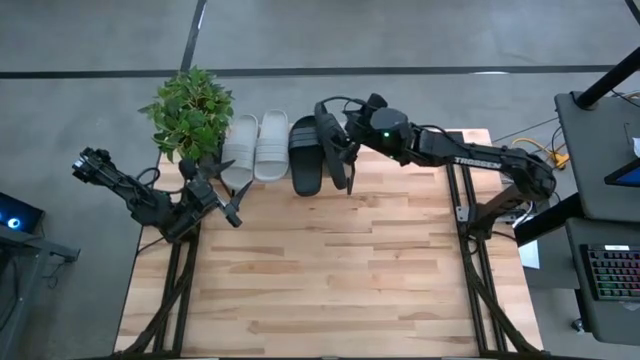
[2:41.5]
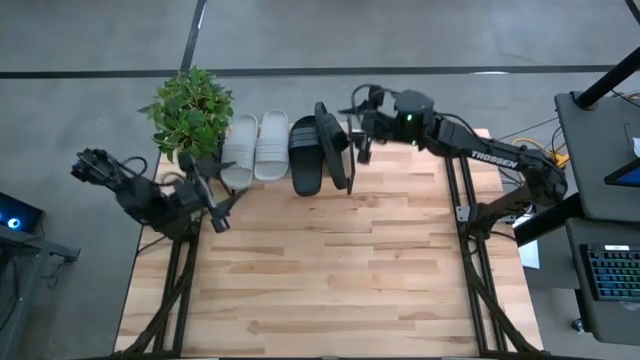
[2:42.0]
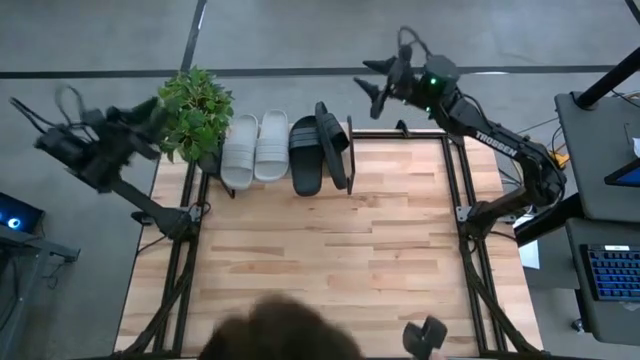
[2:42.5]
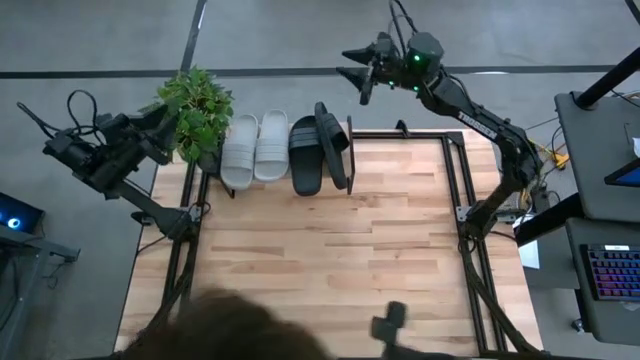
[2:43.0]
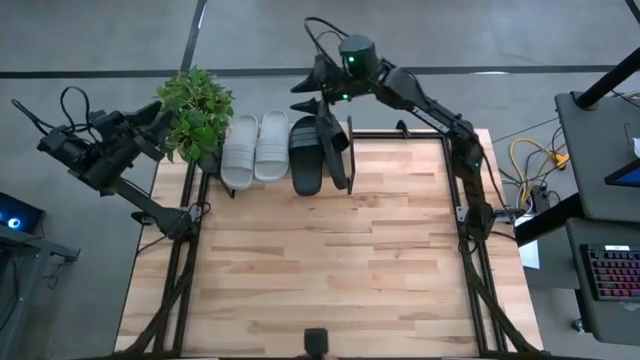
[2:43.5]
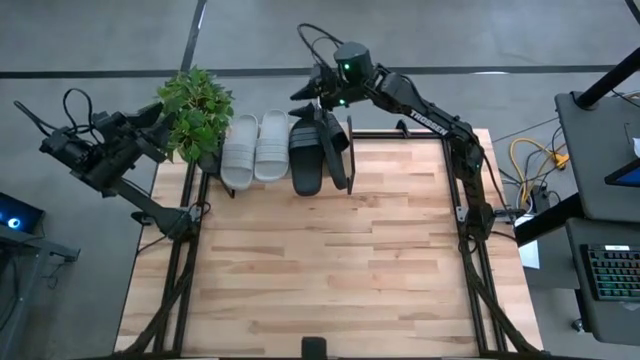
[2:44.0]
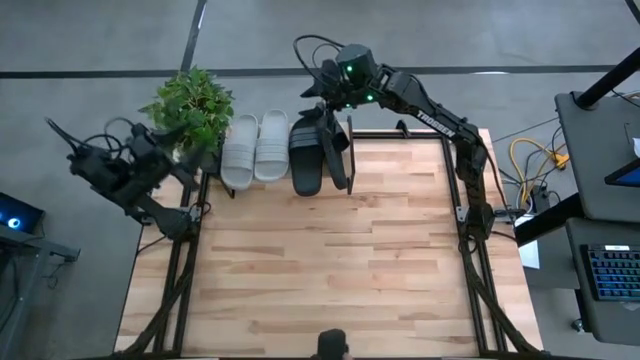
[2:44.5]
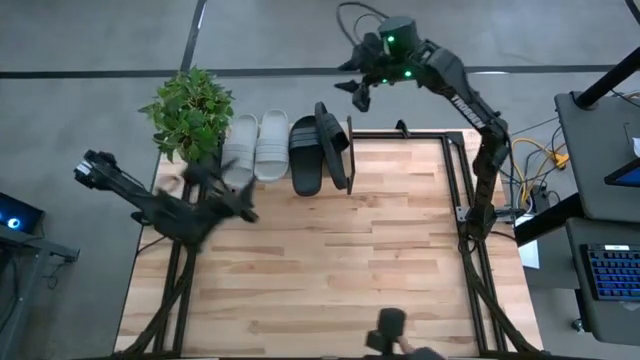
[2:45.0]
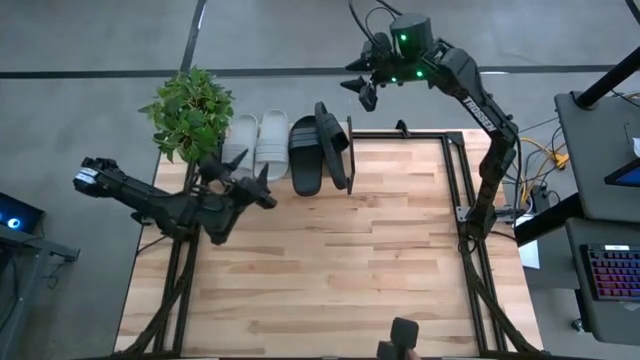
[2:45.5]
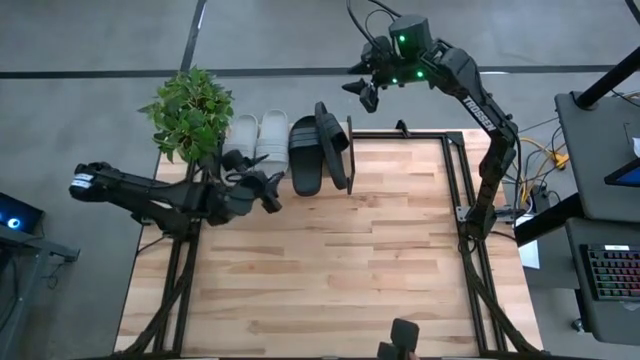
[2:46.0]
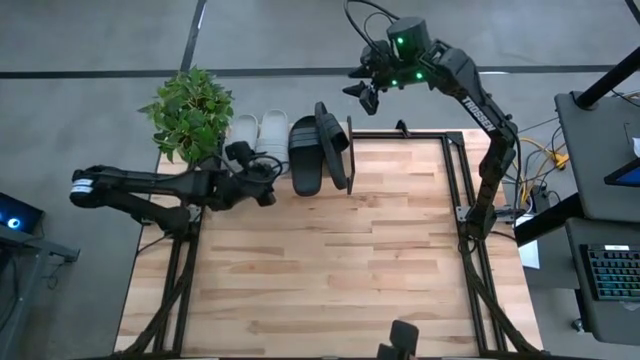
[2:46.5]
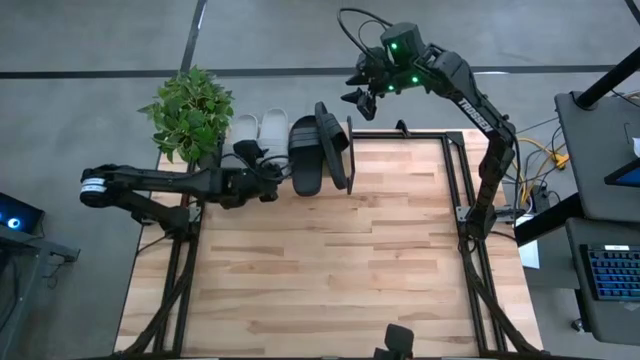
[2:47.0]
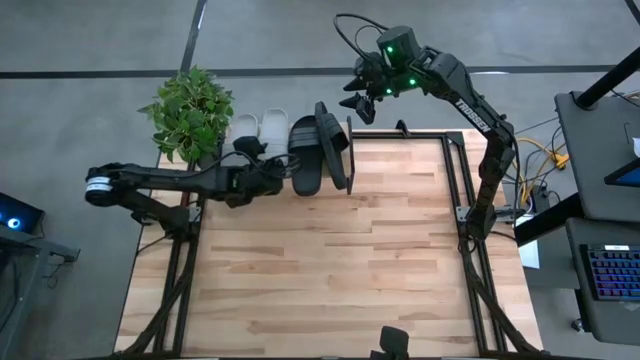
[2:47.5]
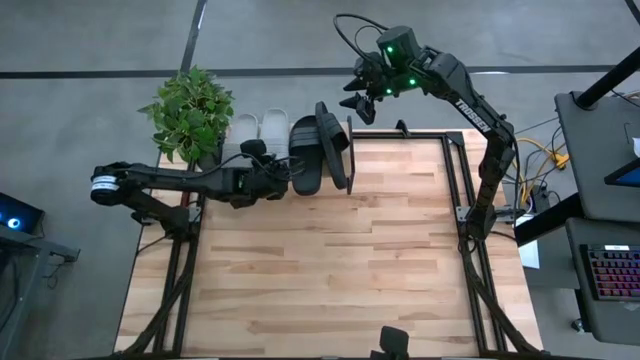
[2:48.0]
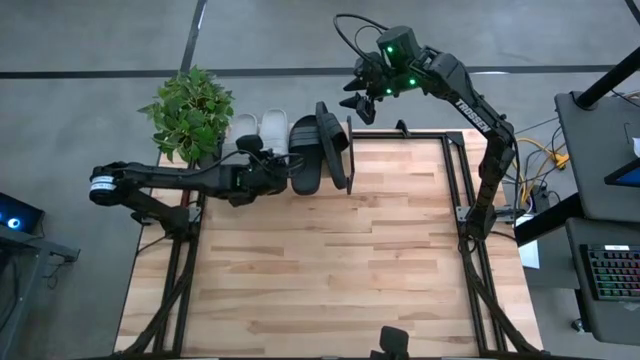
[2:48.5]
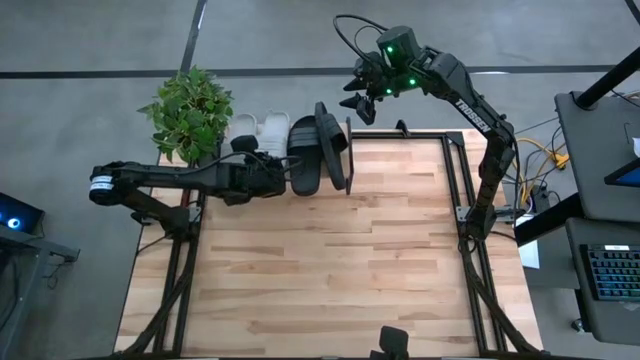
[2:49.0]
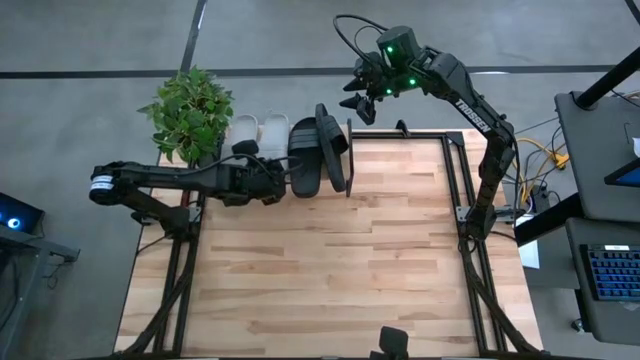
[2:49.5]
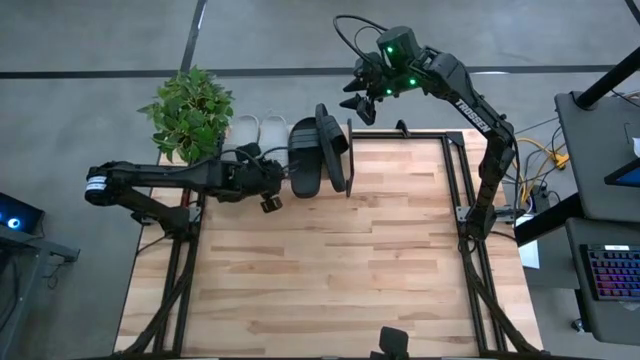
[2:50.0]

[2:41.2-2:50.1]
Task: Pick and place slides into the shelf
Adjust the right grey slipper on the shelf

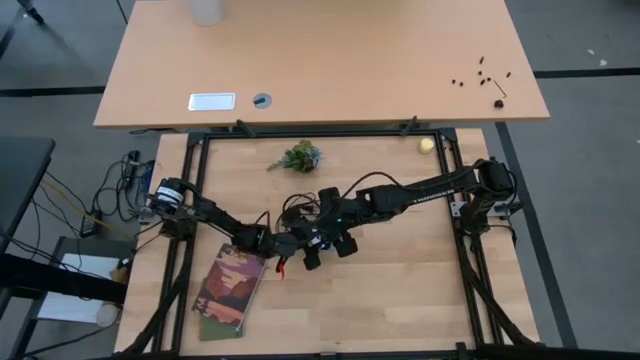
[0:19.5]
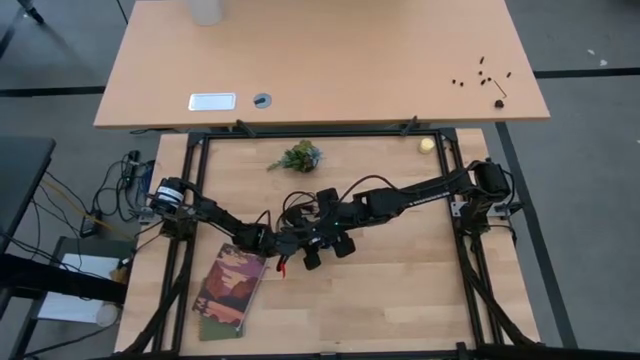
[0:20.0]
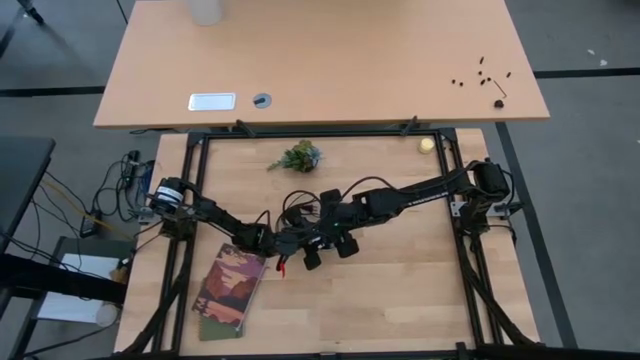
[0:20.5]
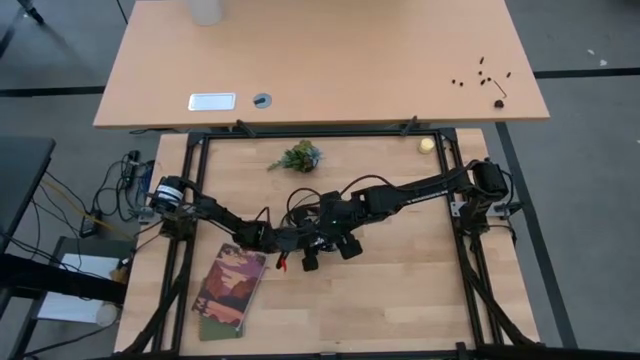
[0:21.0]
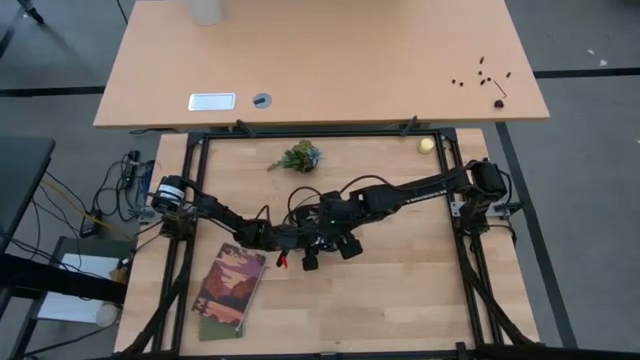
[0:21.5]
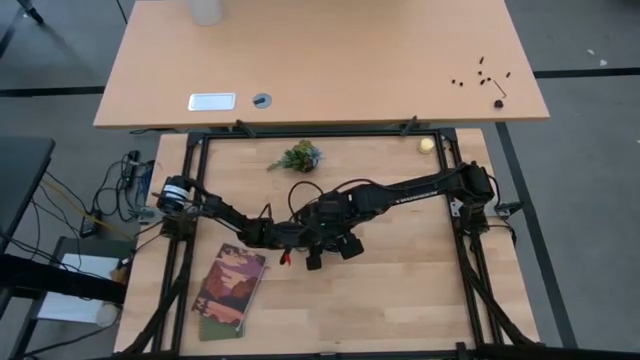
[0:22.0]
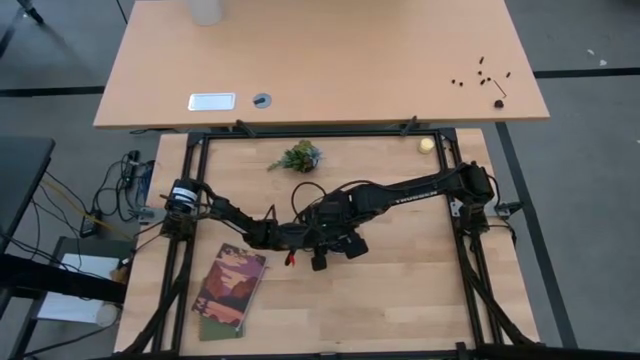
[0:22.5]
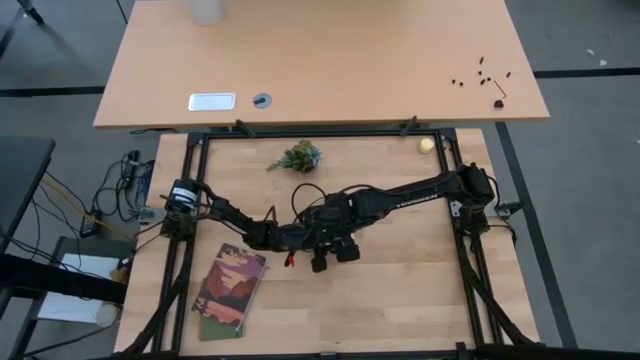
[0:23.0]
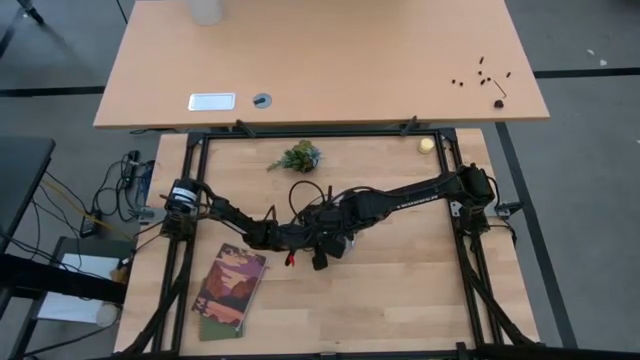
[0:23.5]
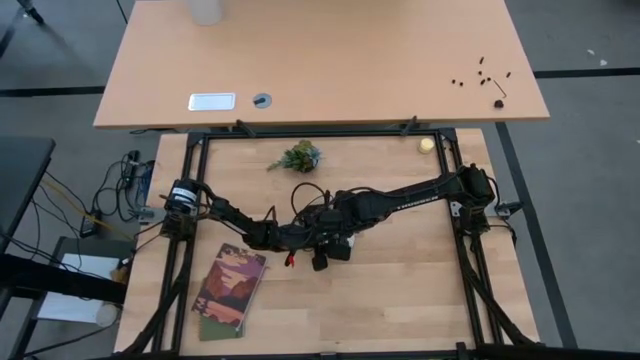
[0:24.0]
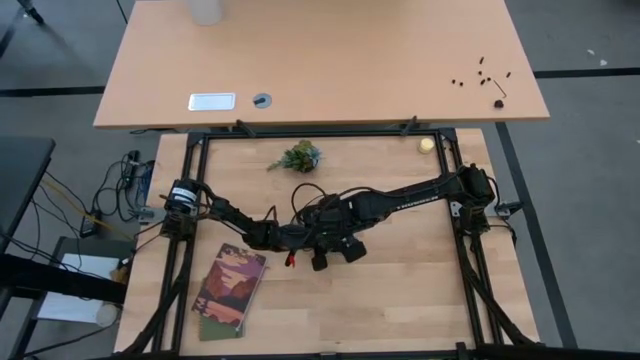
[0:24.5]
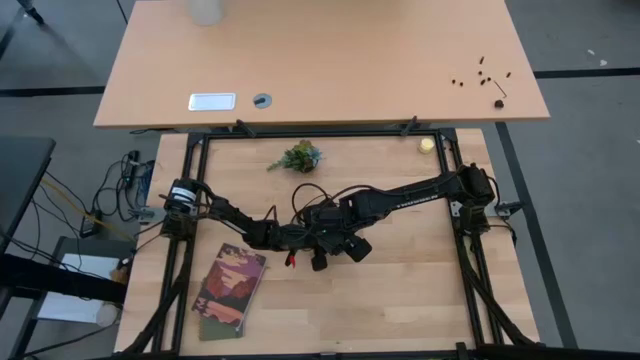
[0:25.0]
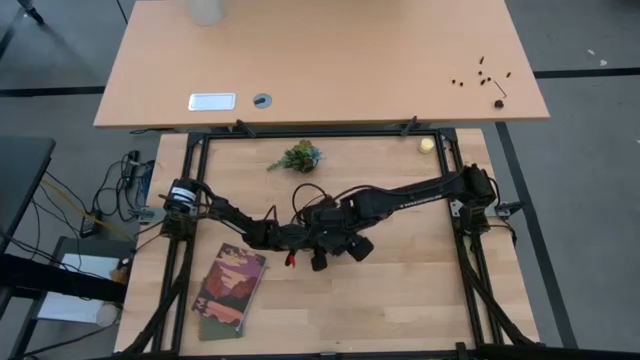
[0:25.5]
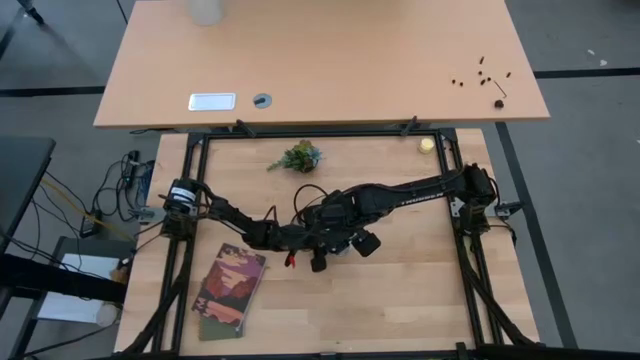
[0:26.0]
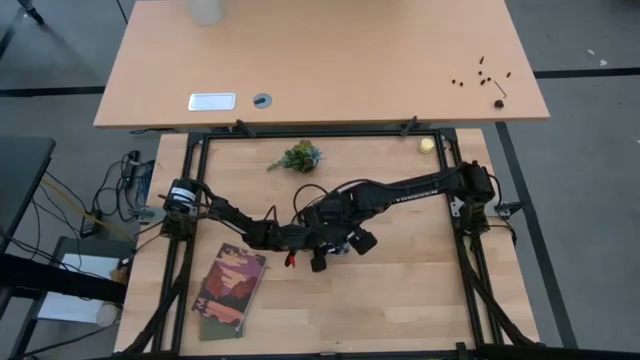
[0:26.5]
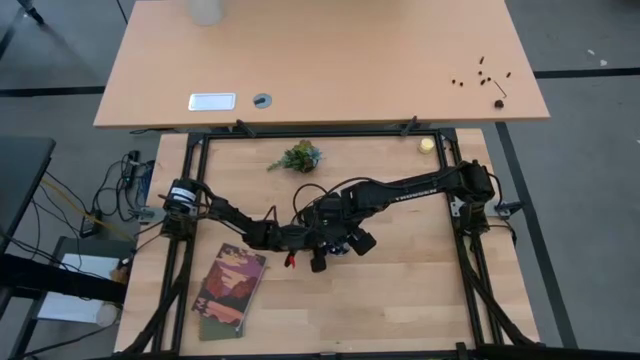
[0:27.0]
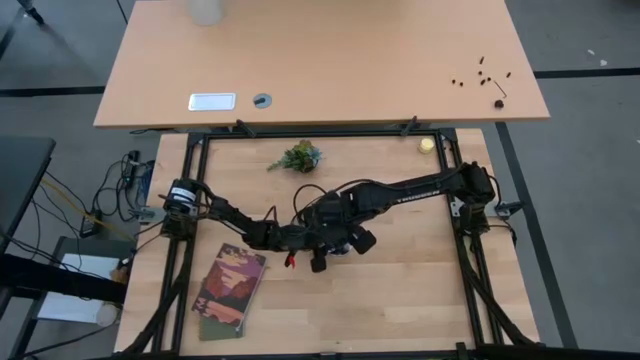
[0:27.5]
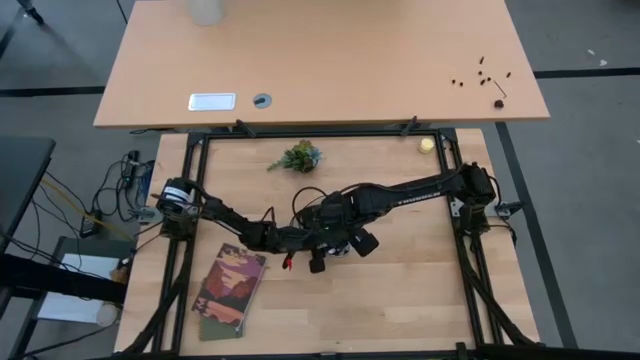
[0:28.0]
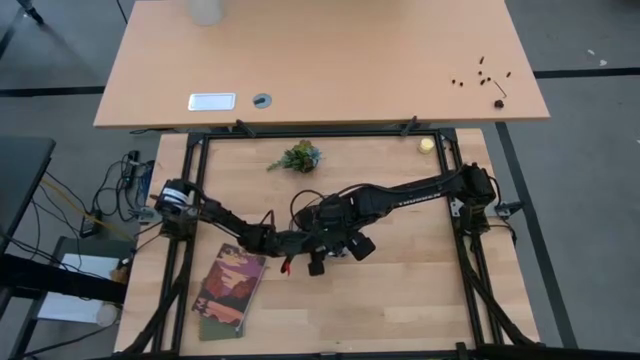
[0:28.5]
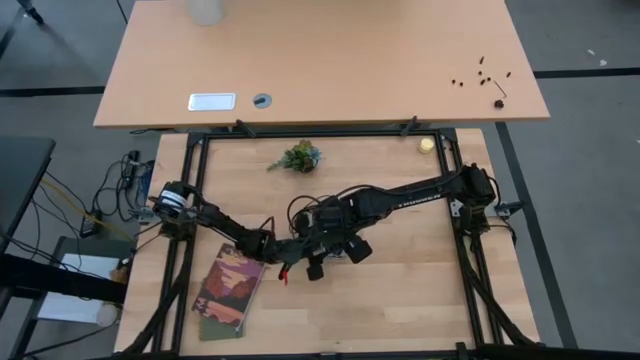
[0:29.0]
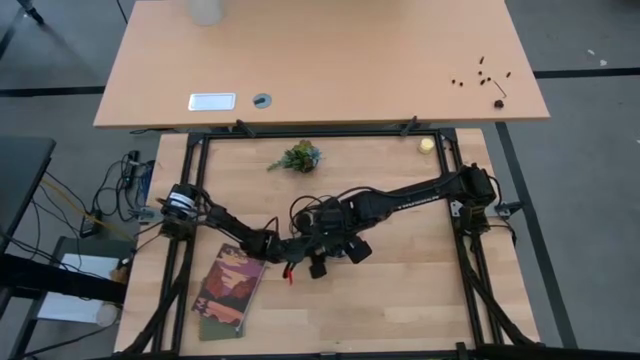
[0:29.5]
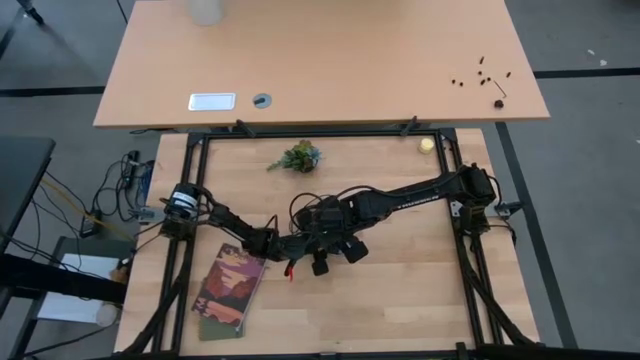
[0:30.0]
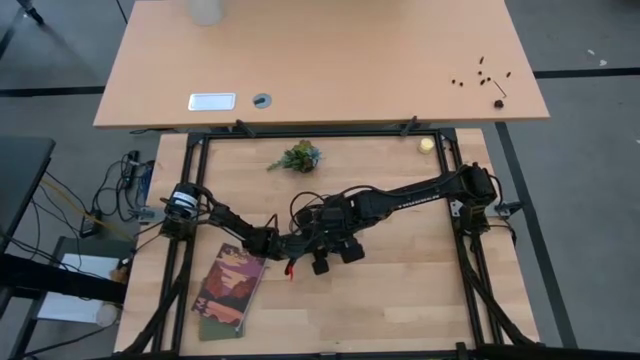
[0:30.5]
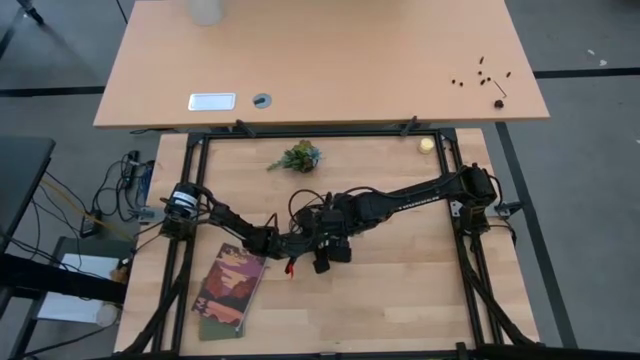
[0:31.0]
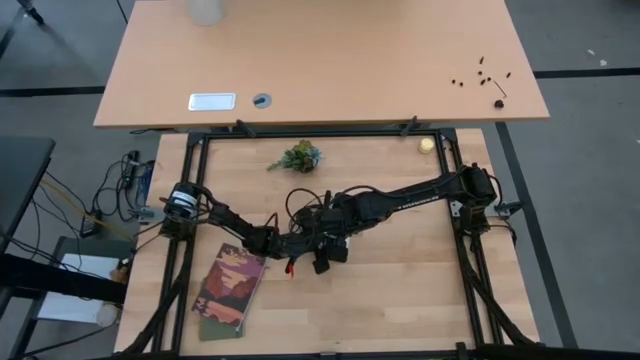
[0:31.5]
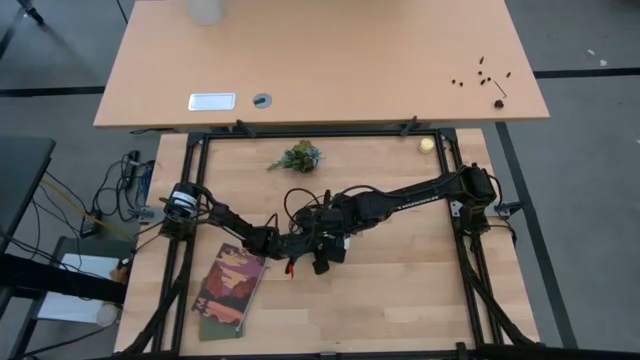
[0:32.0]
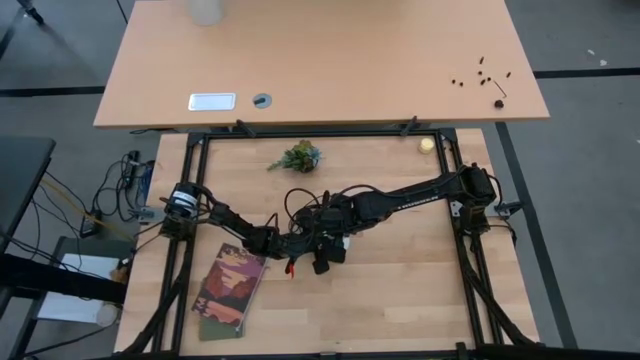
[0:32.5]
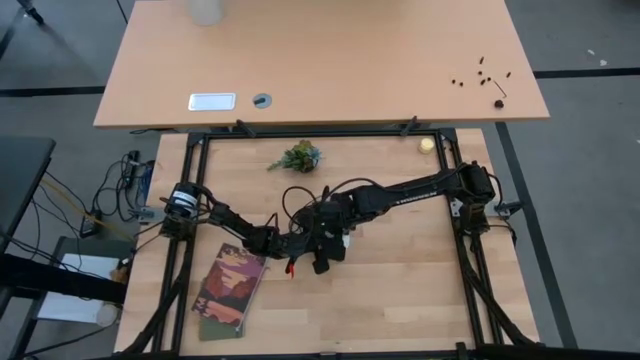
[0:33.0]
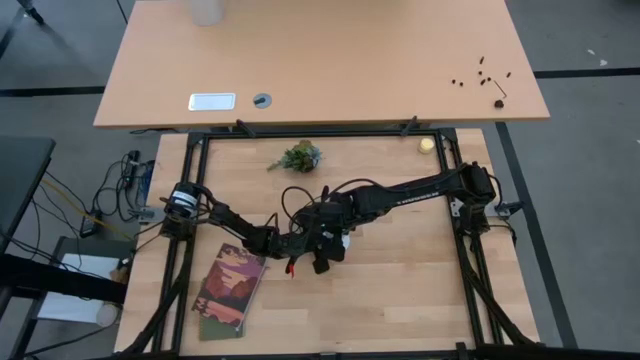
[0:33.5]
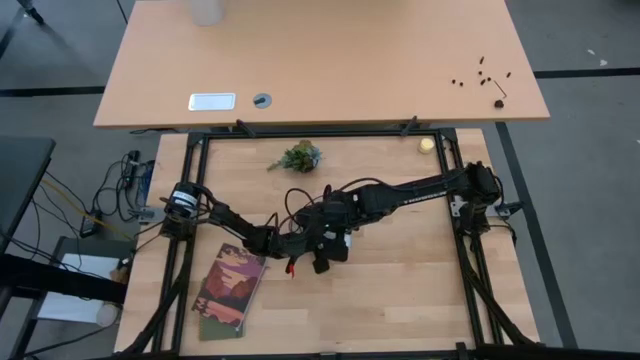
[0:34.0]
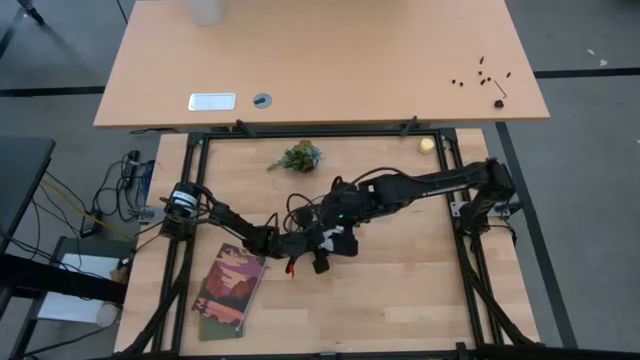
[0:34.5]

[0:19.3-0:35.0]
Task: Screw lightbulb
Insert the white lightbulb into the lamp socket
